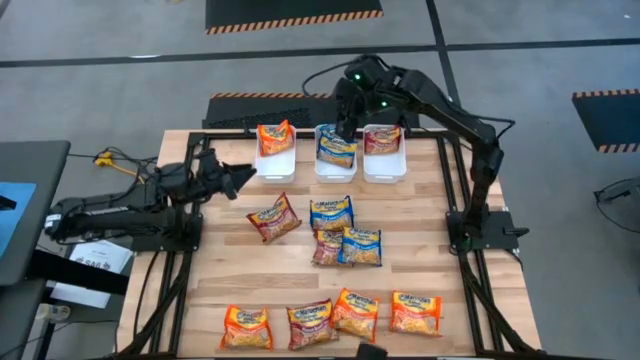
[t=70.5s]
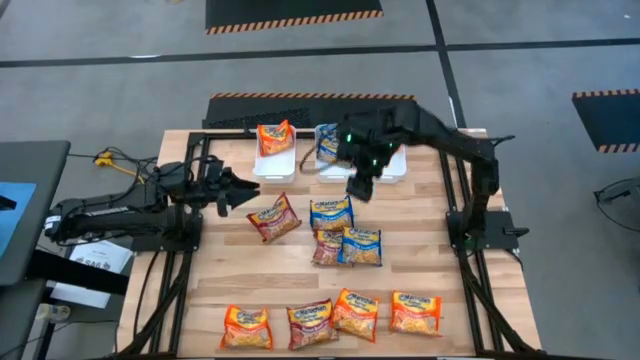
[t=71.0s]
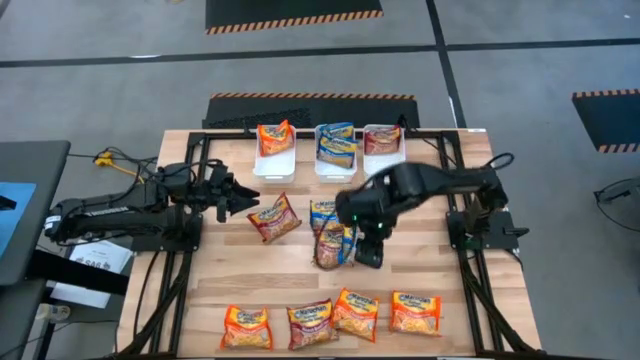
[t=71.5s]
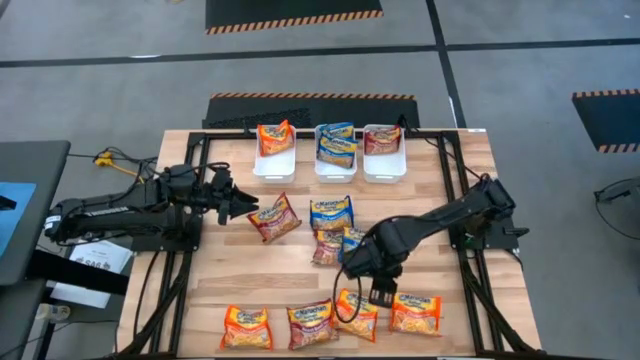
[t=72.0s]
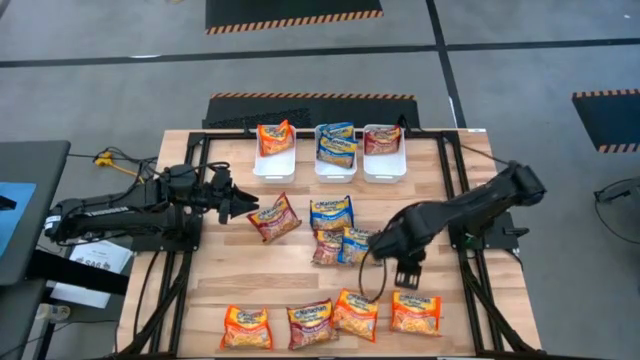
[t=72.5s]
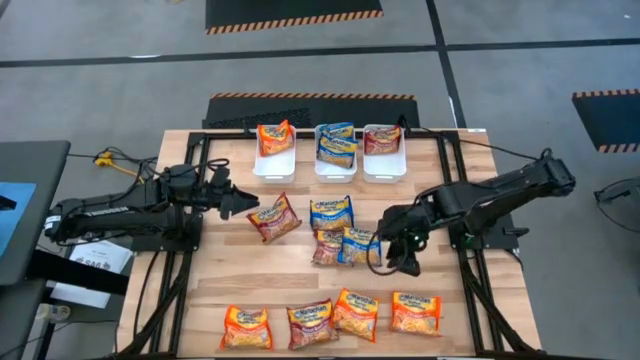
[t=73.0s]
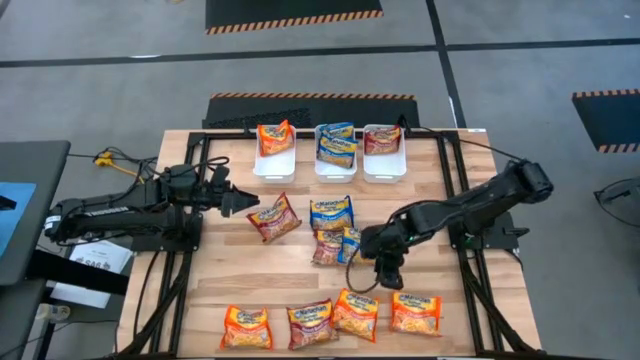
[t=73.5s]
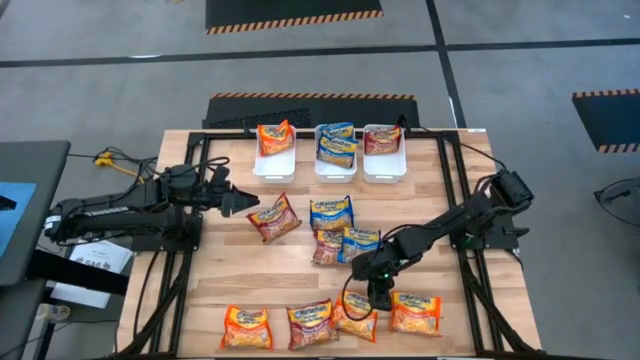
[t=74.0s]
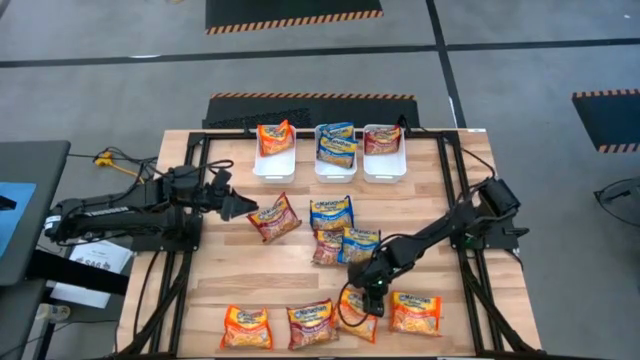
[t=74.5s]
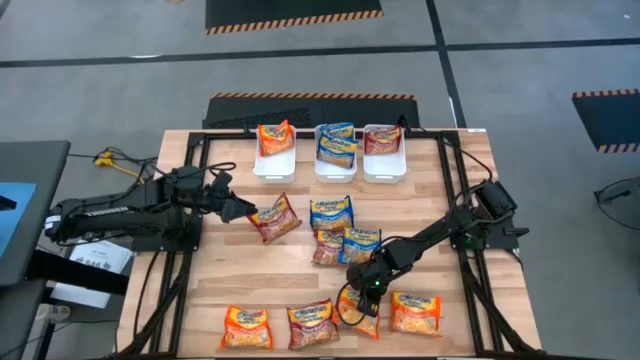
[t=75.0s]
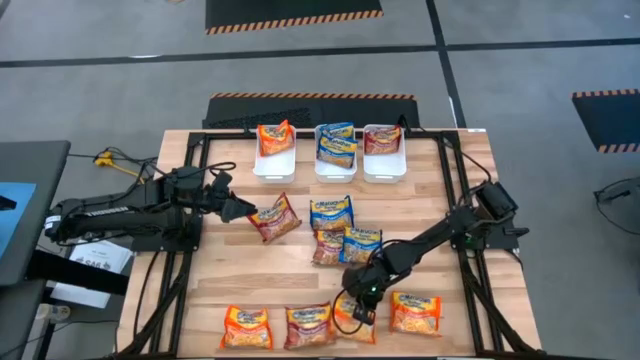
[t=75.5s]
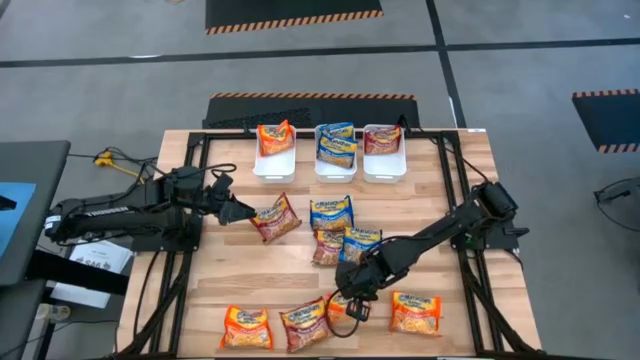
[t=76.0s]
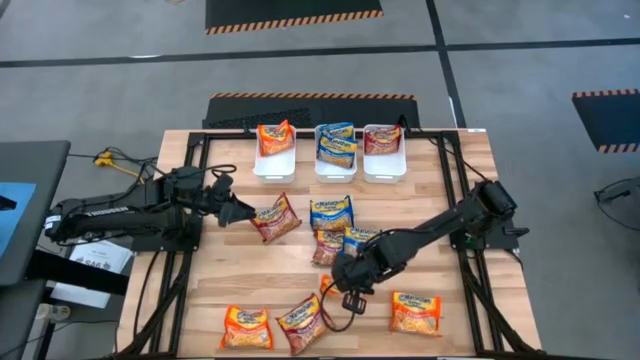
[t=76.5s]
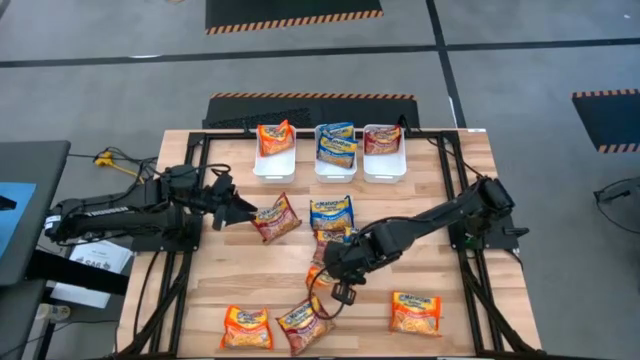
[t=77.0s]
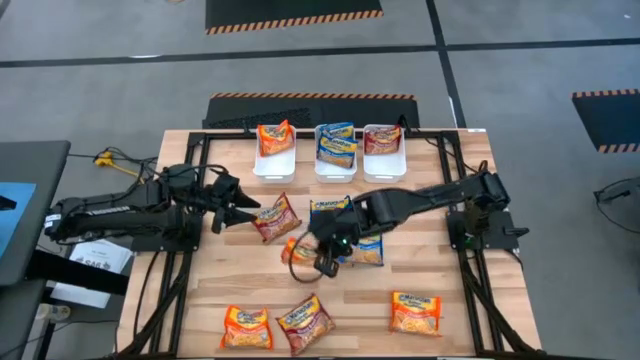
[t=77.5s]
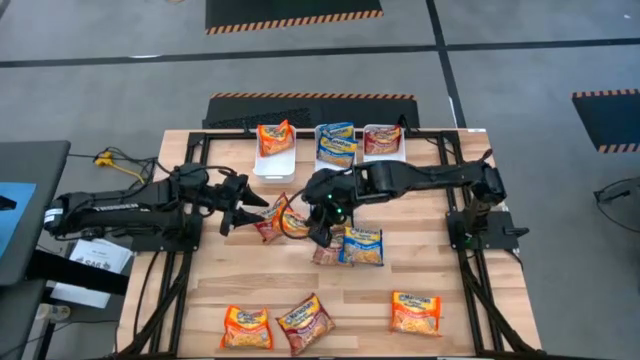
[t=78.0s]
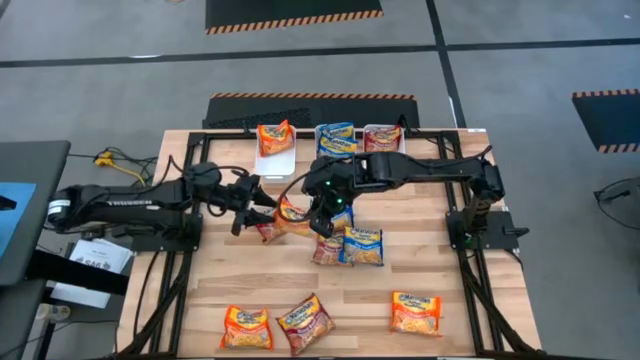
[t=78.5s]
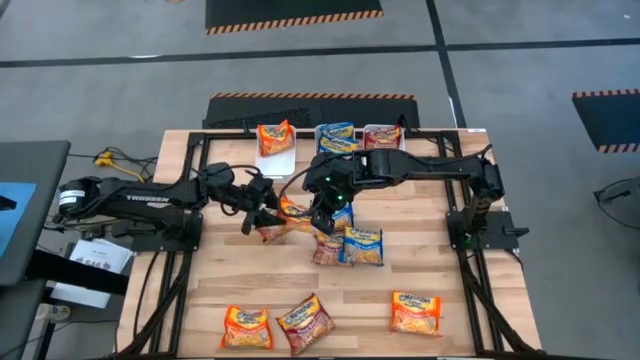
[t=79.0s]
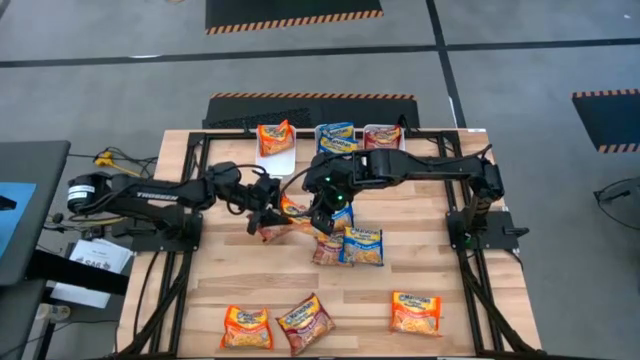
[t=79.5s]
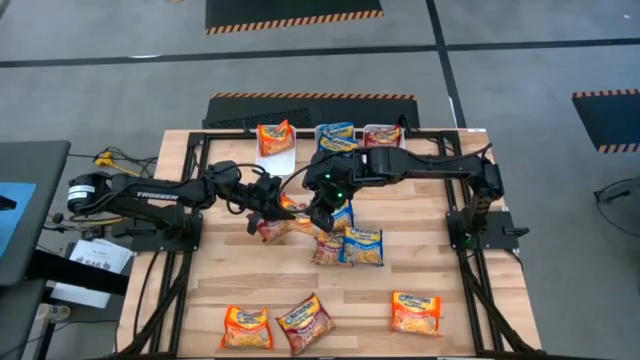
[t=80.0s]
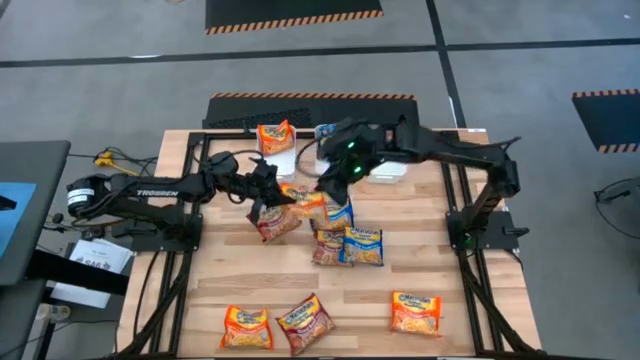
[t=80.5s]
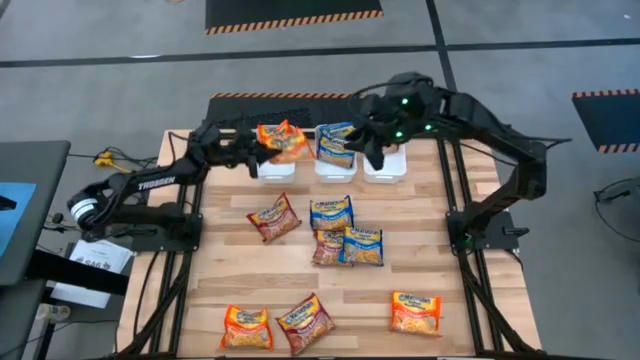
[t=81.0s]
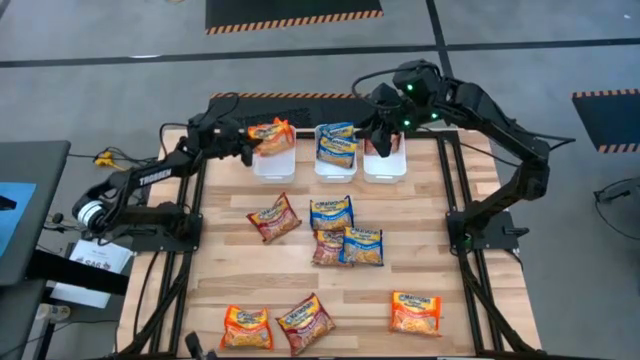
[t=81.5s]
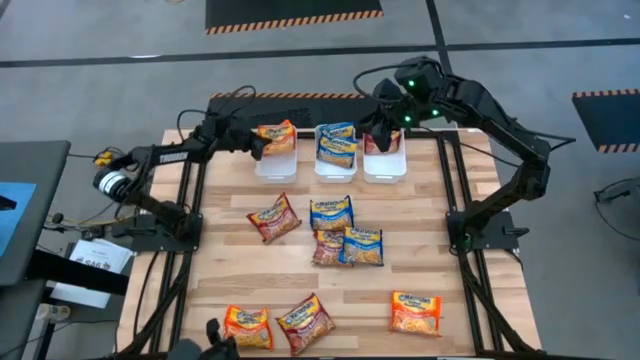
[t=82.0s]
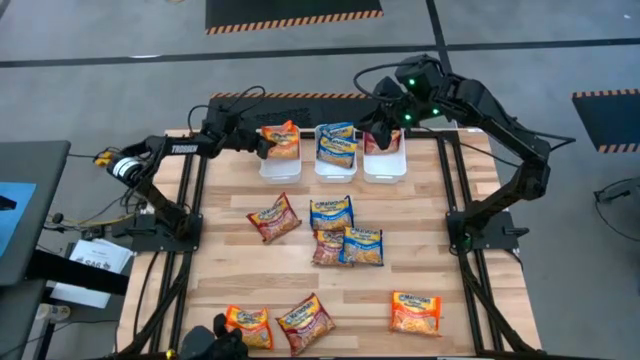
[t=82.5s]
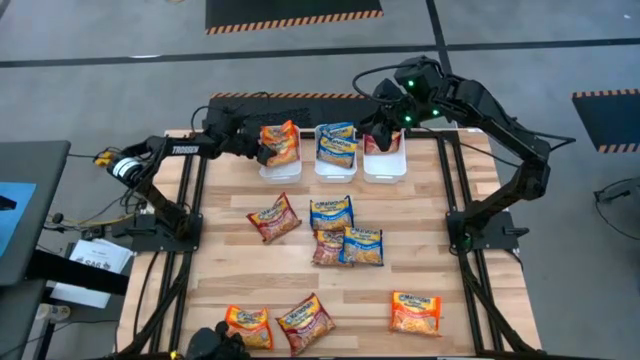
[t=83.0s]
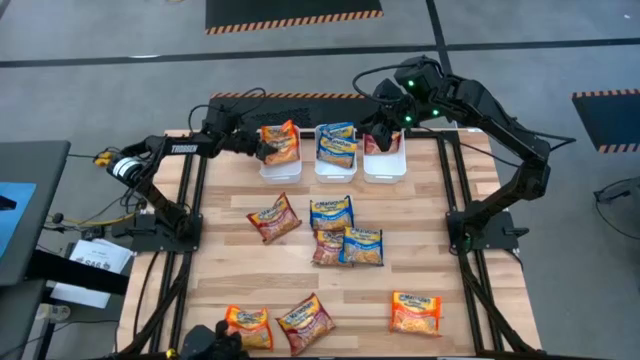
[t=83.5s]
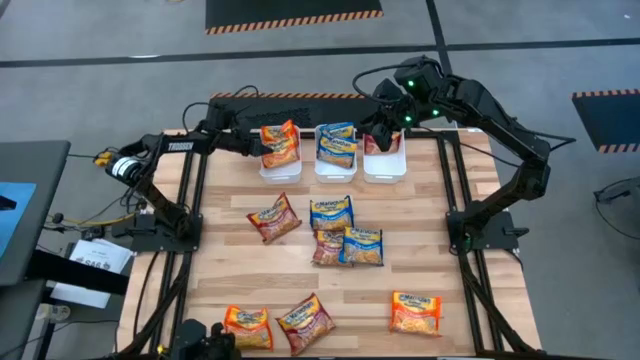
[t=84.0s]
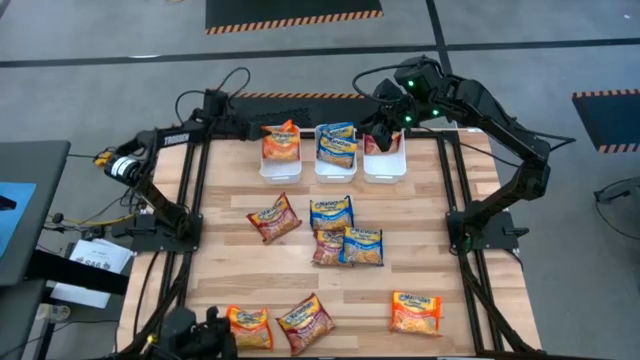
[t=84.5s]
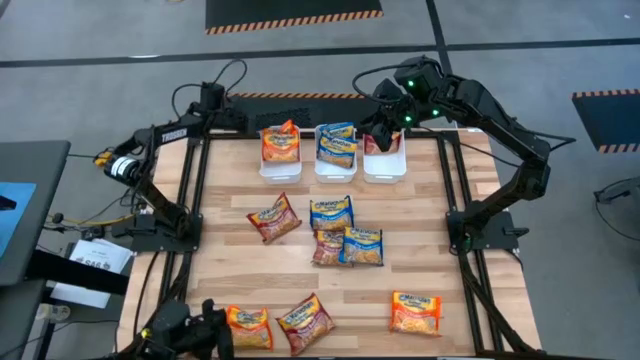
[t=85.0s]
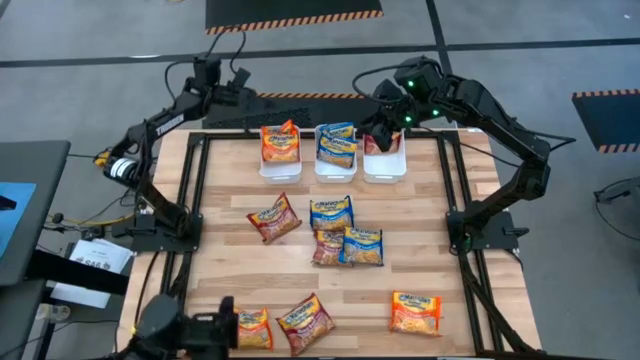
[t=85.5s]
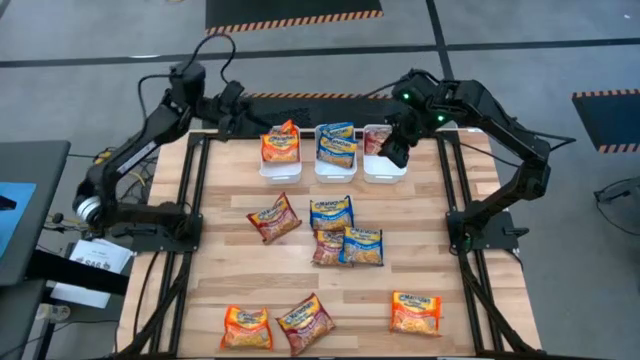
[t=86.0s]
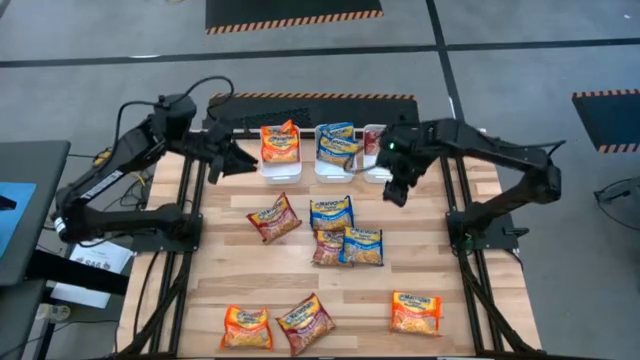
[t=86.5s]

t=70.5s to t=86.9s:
Task: Sort Maruchan noodles
Put the middle orange noodle soup pack into the left white bin
